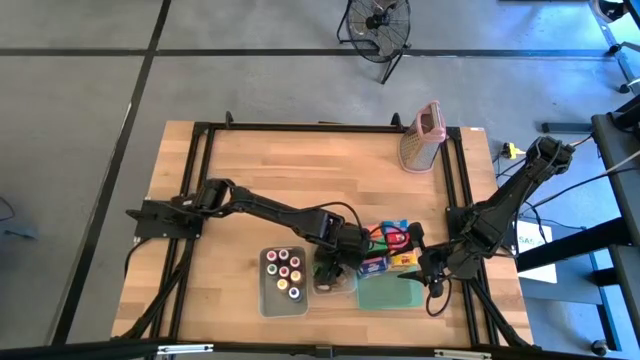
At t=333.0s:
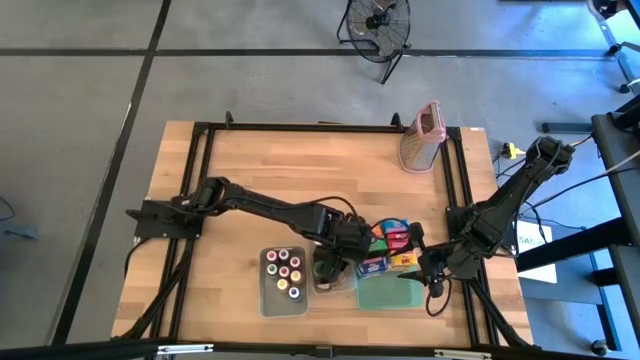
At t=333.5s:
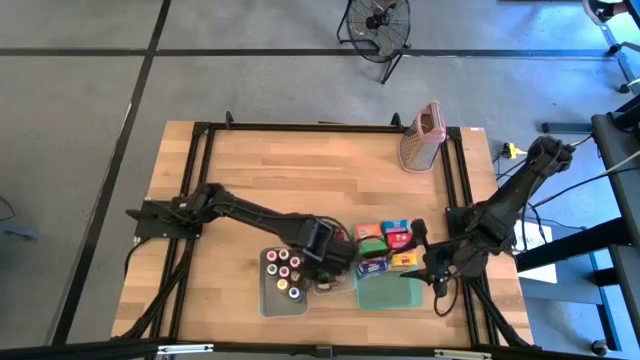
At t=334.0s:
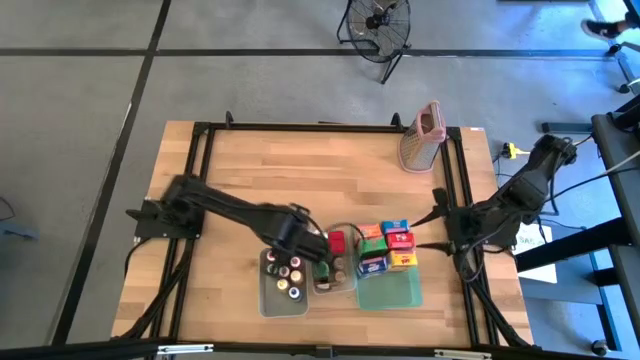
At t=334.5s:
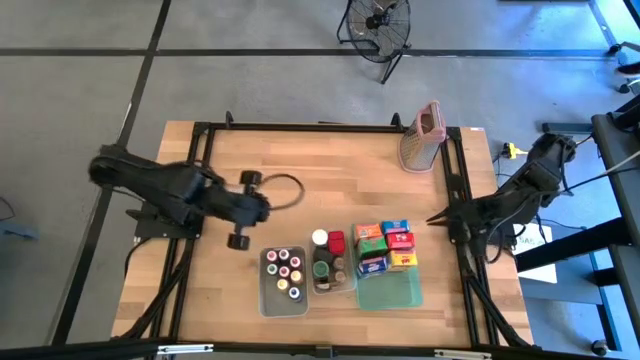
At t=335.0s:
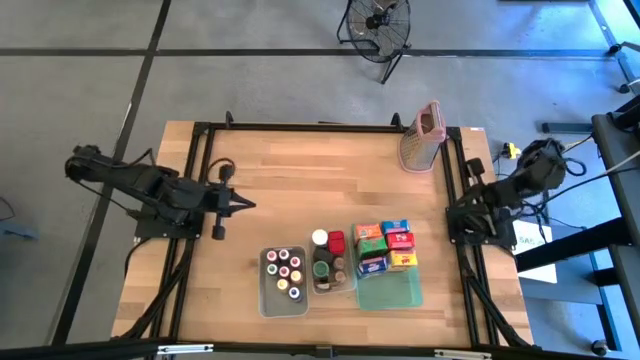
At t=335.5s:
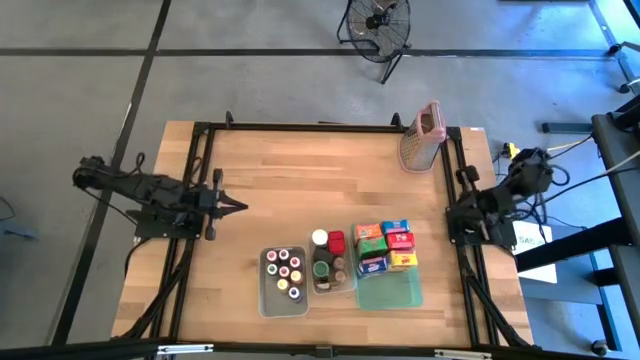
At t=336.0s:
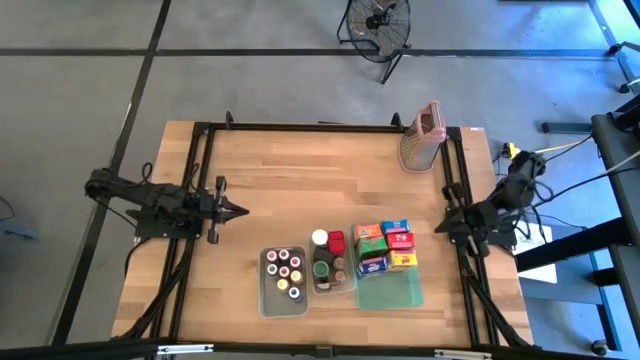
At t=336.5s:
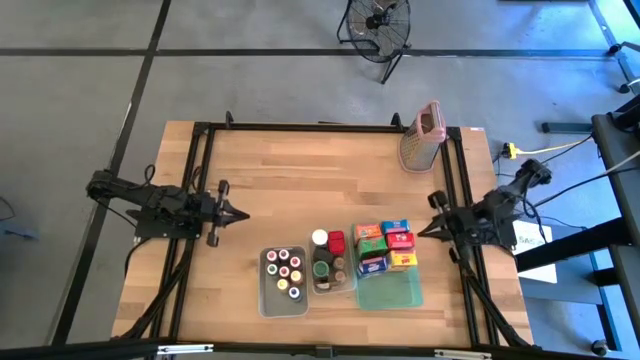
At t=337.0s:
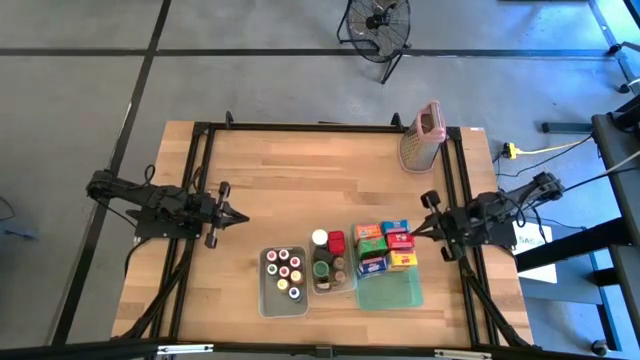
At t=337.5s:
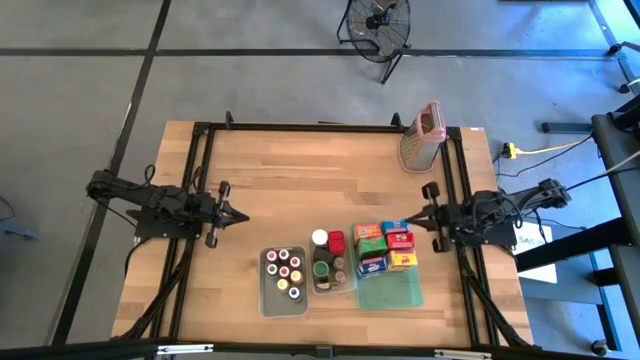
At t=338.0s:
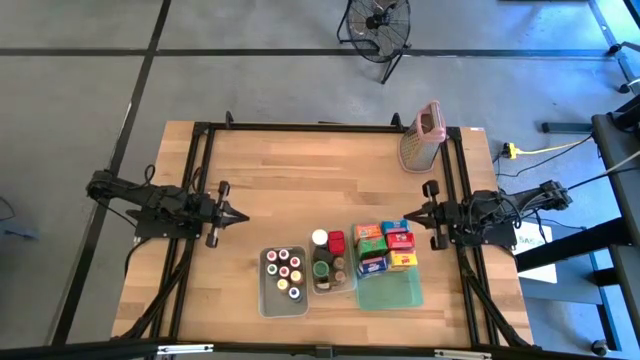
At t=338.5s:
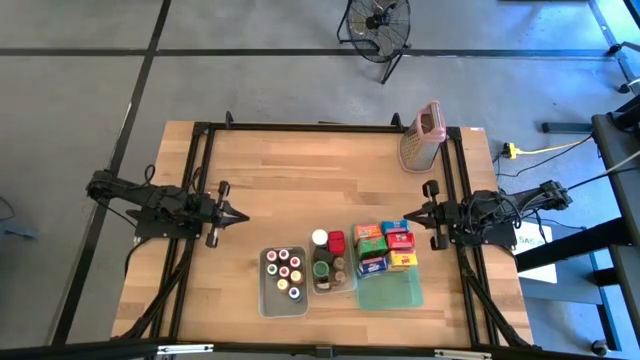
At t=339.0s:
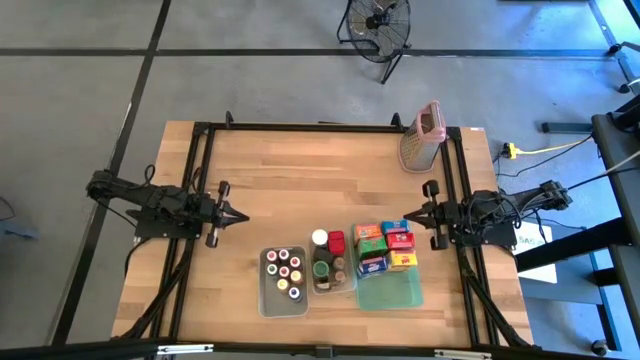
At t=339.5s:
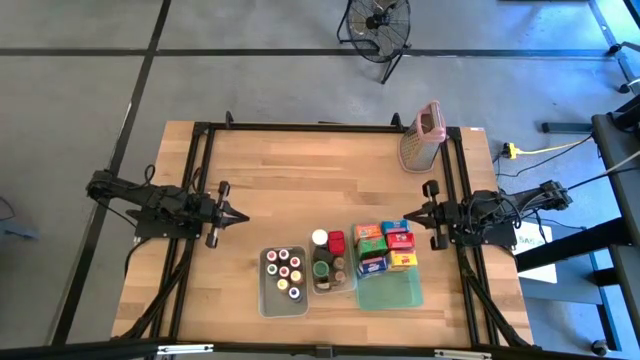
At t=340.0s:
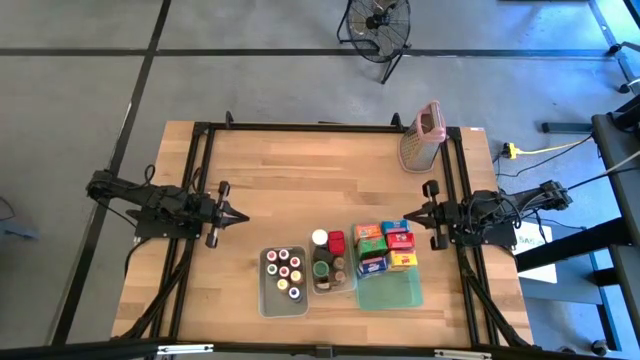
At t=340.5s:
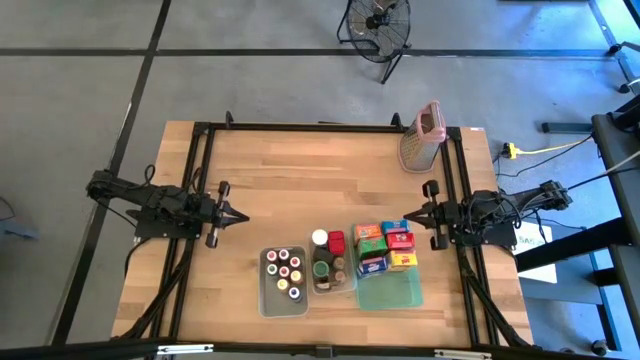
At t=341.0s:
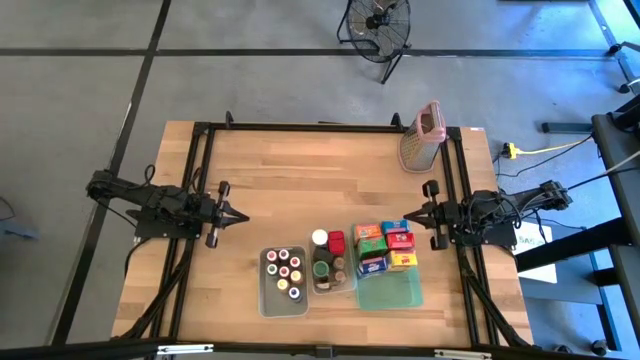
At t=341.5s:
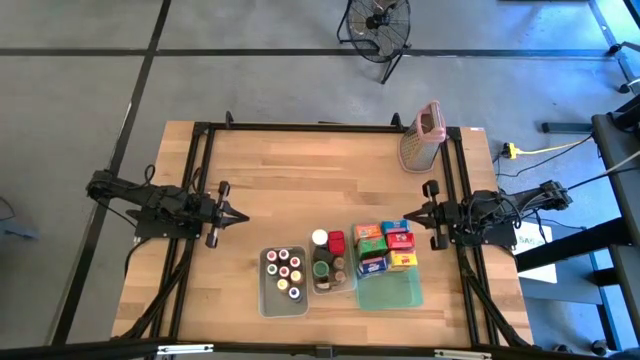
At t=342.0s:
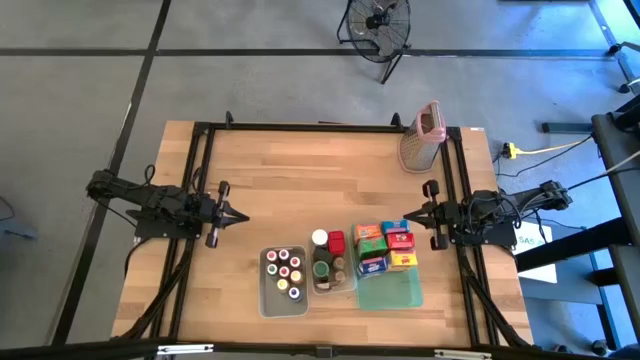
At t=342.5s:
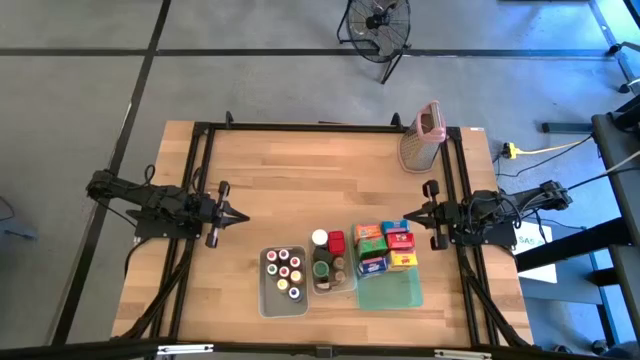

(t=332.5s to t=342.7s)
Task: Pick & Place Kitchen Items
Return to Home Position

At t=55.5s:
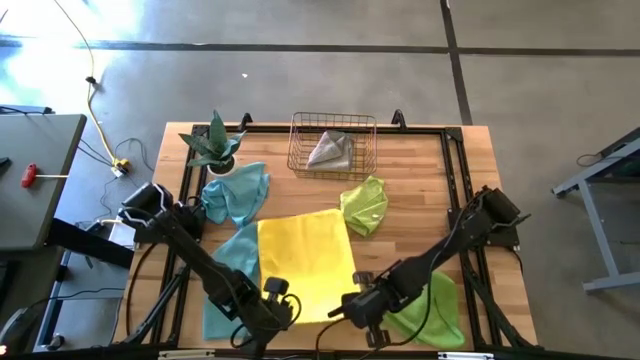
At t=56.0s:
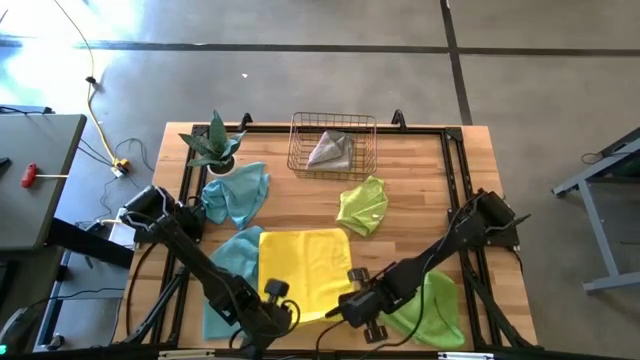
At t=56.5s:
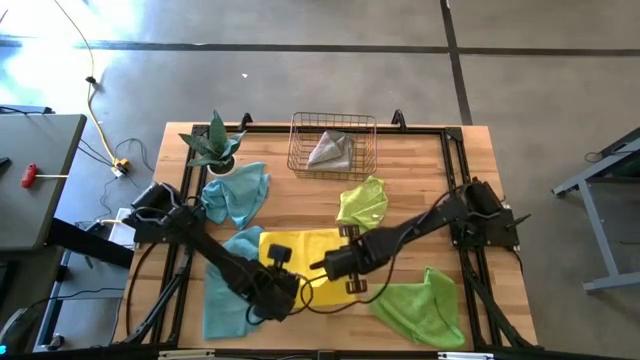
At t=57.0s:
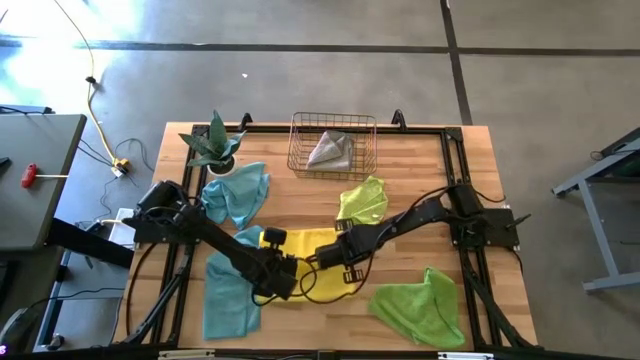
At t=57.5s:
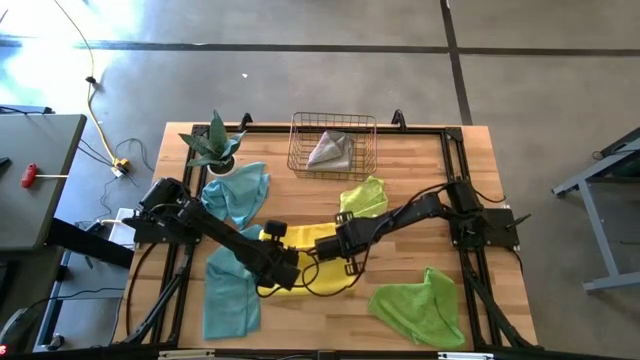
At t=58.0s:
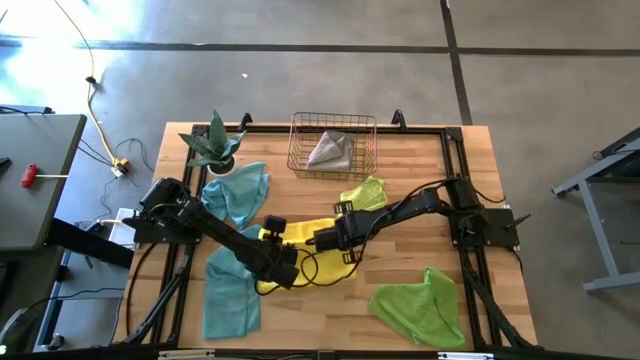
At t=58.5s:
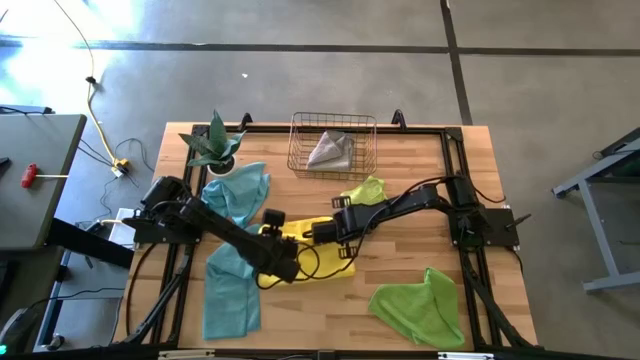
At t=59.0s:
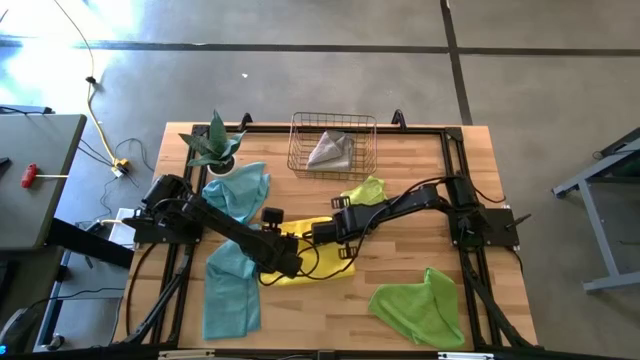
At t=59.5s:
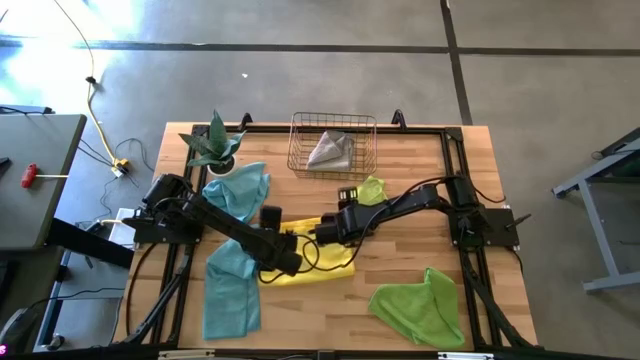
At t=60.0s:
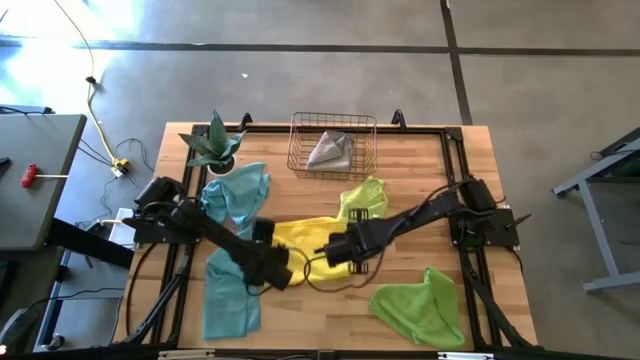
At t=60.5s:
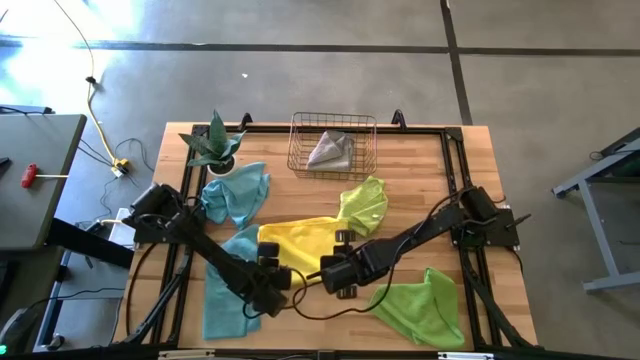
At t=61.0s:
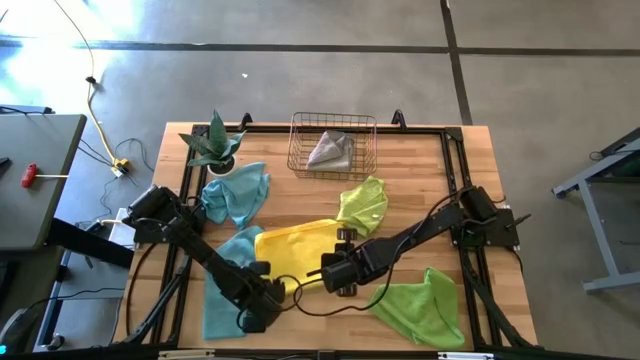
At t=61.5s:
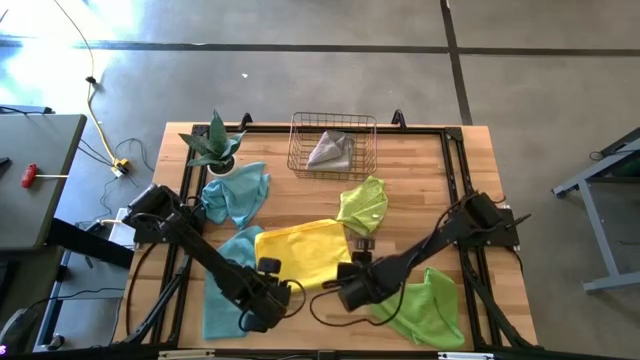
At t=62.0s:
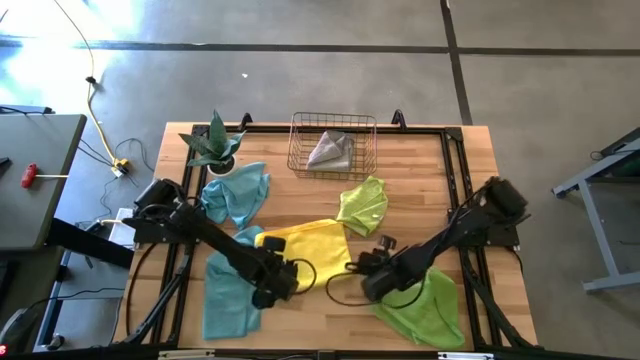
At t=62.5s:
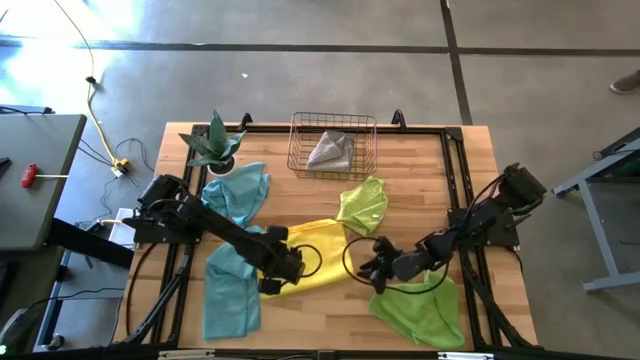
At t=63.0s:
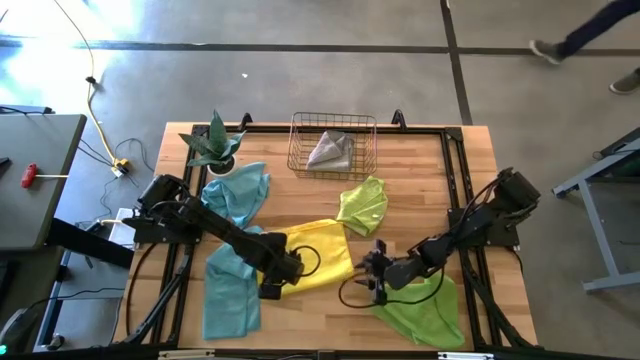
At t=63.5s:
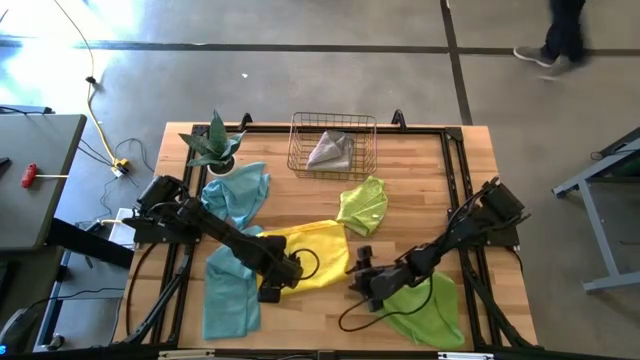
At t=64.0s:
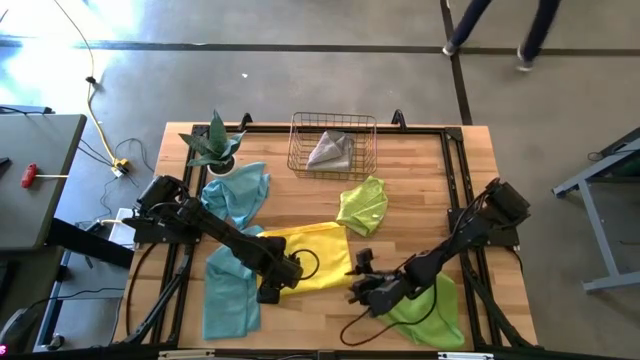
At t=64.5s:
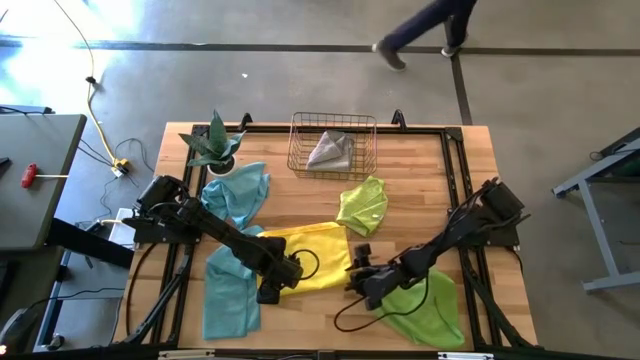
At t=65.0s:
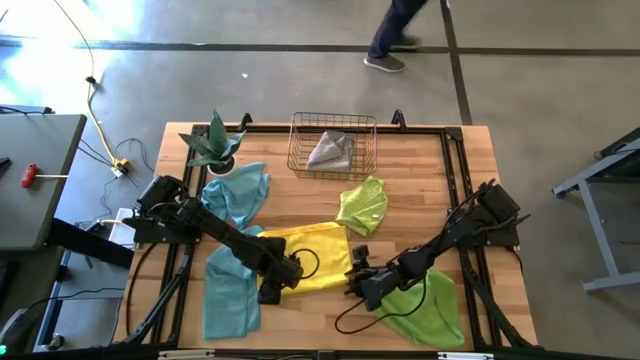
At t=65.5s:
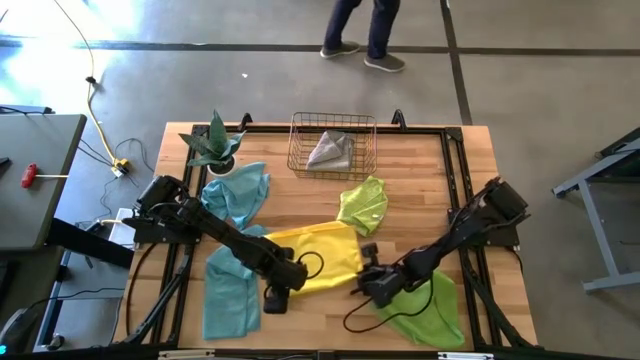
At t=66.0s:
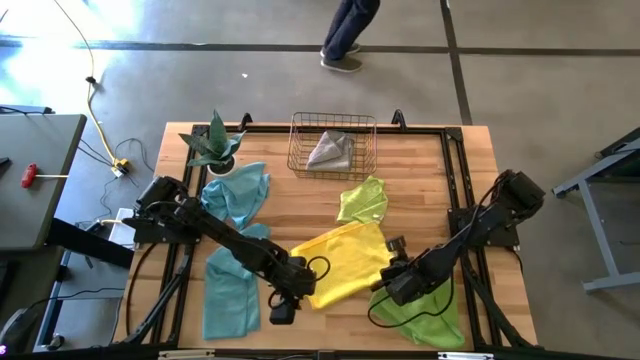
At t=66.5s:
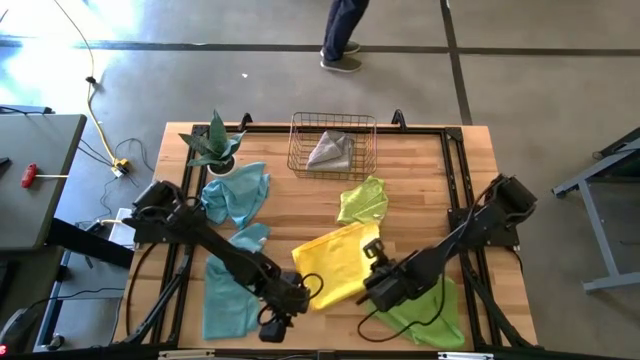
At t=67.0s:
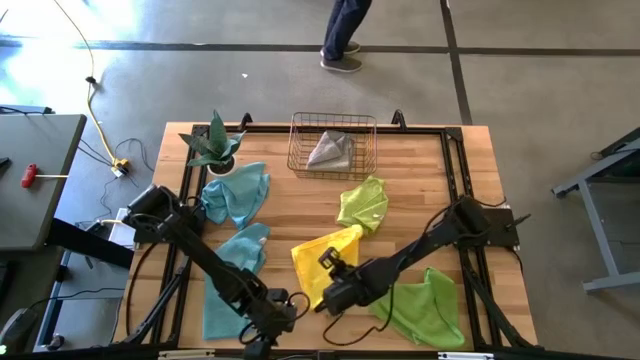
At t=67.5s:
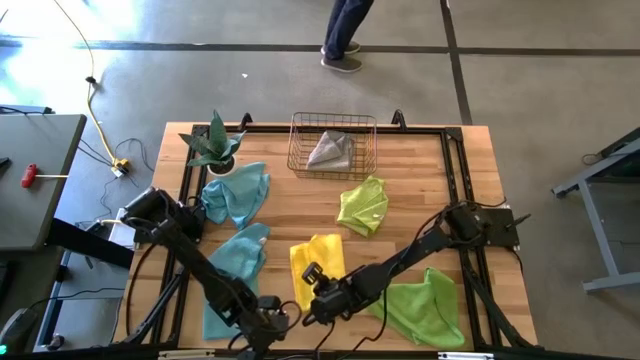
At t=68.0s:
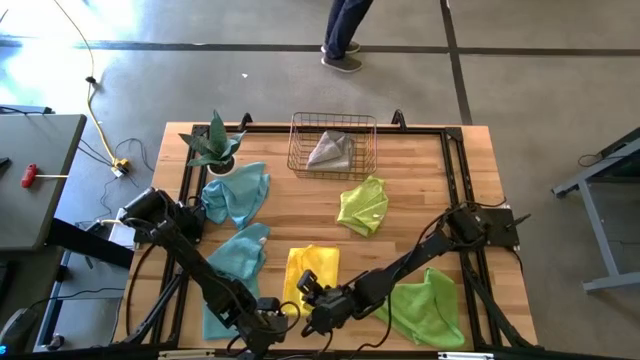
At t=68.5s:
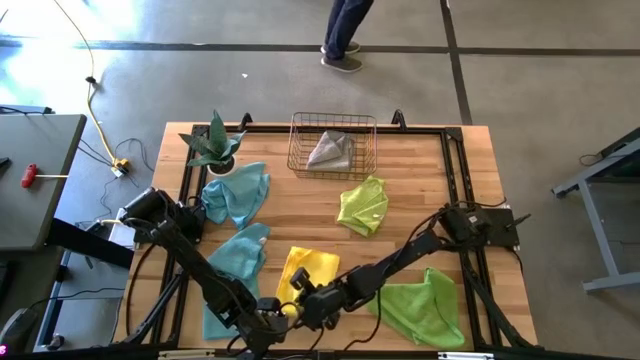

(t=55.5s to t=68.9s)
Task: Fold microfiber towels
Fold the yellow microfiber towel
